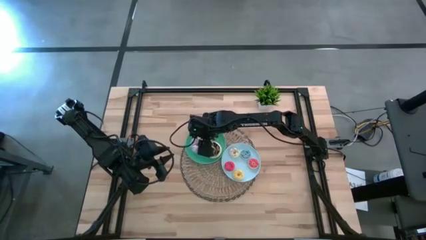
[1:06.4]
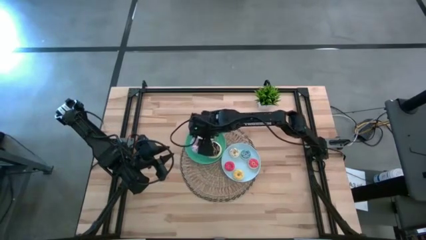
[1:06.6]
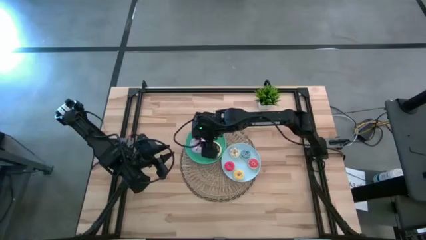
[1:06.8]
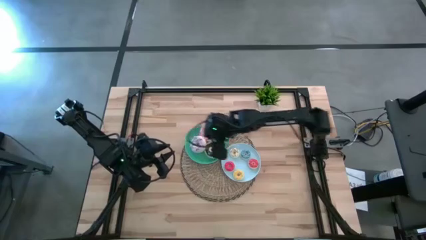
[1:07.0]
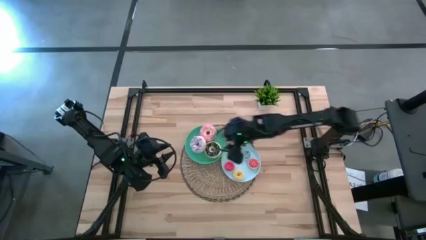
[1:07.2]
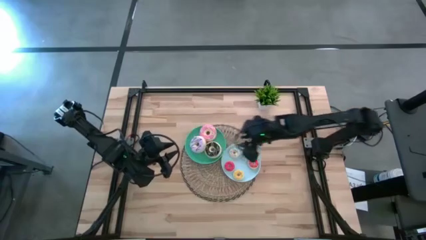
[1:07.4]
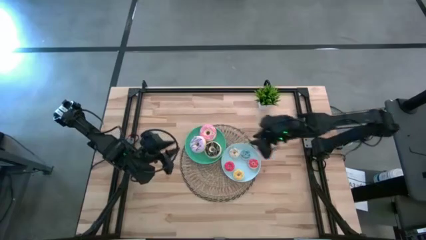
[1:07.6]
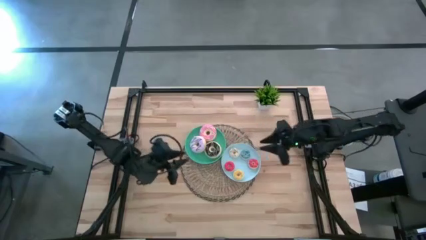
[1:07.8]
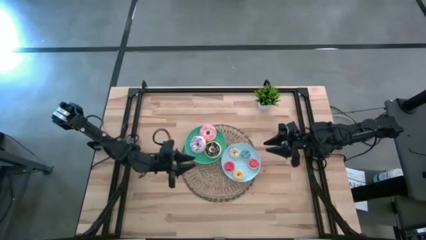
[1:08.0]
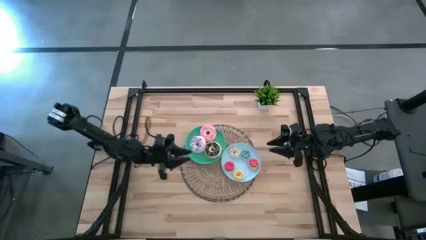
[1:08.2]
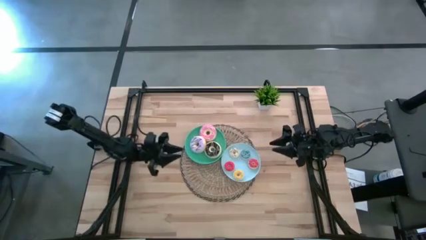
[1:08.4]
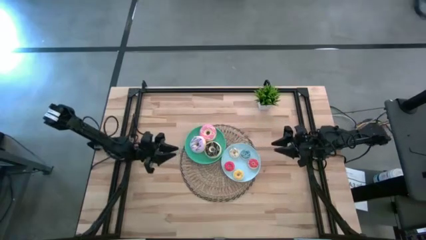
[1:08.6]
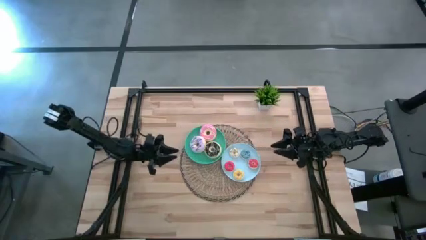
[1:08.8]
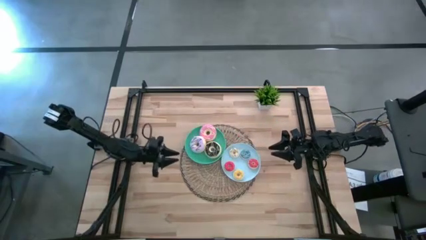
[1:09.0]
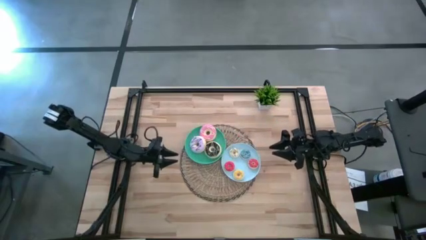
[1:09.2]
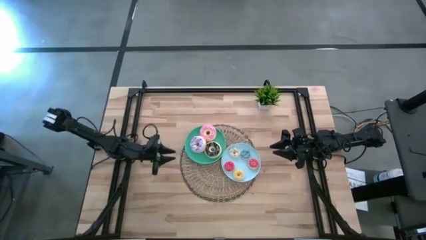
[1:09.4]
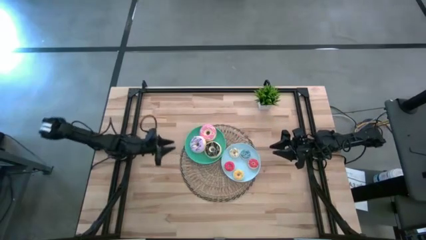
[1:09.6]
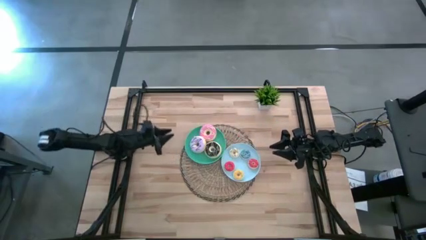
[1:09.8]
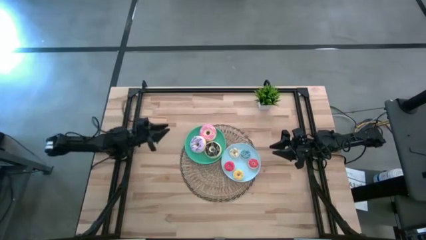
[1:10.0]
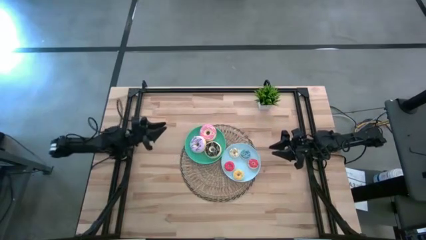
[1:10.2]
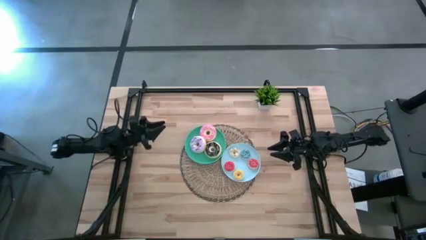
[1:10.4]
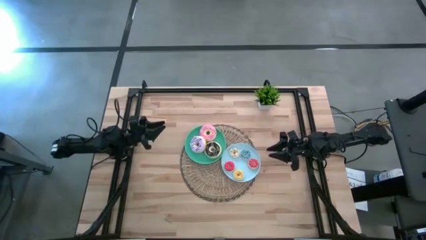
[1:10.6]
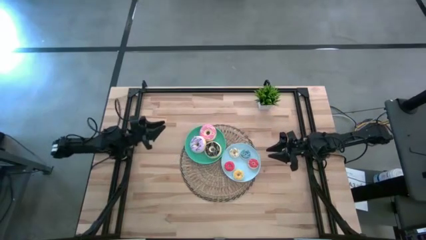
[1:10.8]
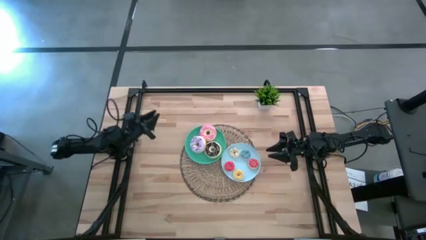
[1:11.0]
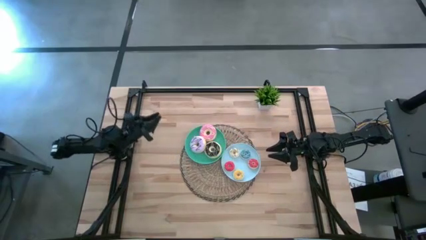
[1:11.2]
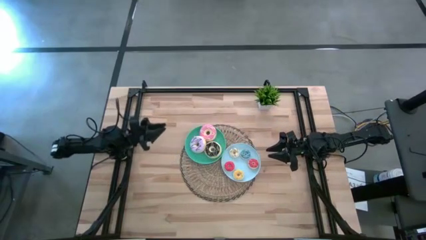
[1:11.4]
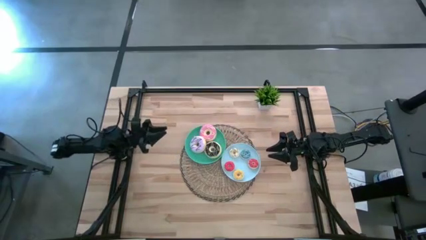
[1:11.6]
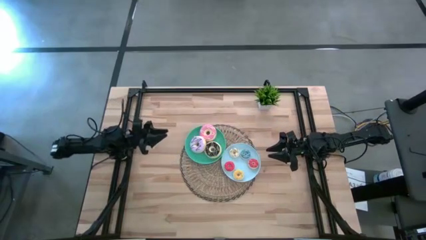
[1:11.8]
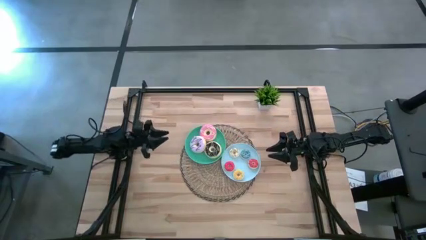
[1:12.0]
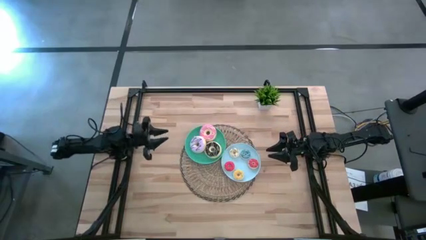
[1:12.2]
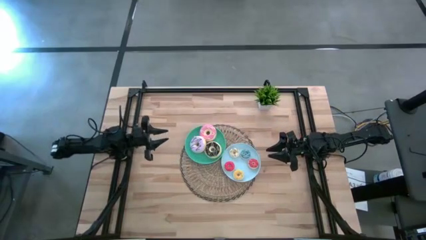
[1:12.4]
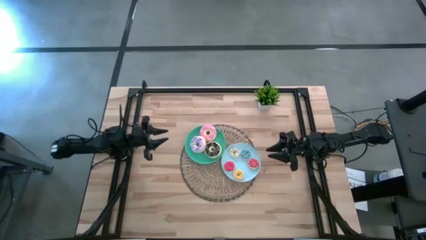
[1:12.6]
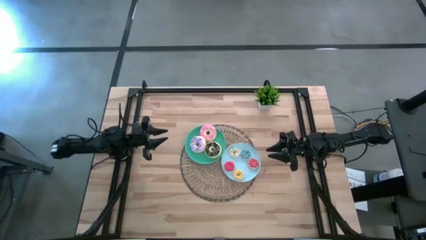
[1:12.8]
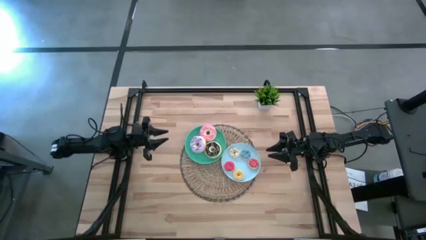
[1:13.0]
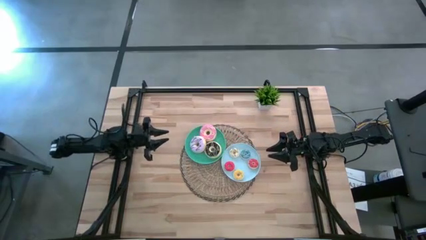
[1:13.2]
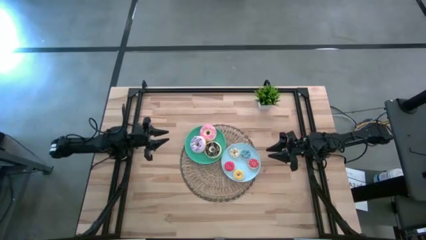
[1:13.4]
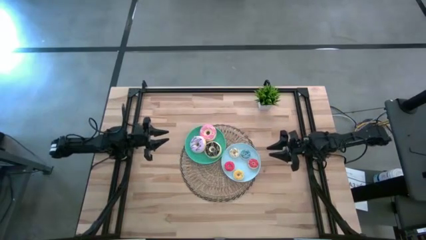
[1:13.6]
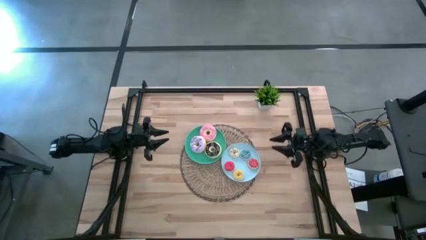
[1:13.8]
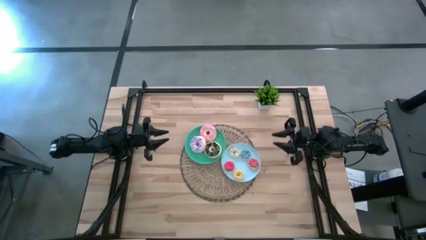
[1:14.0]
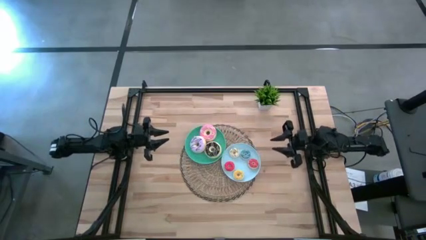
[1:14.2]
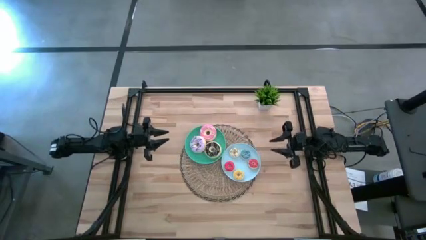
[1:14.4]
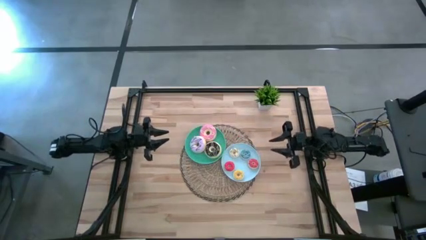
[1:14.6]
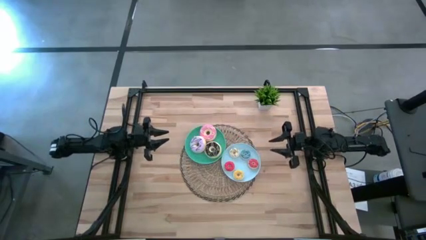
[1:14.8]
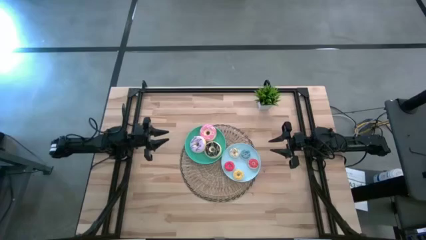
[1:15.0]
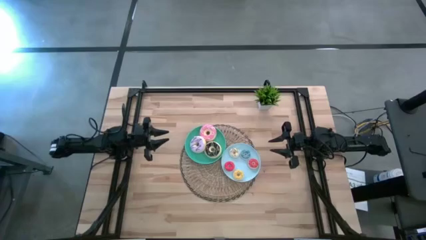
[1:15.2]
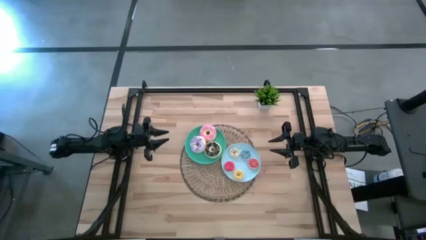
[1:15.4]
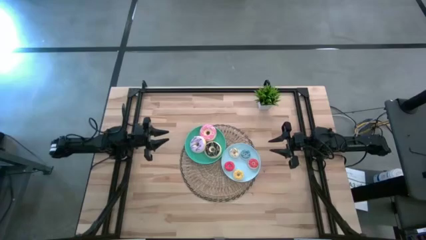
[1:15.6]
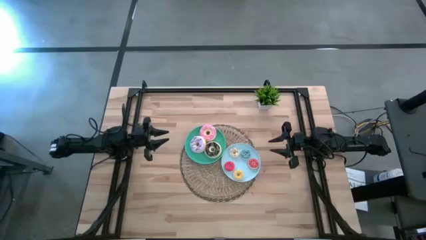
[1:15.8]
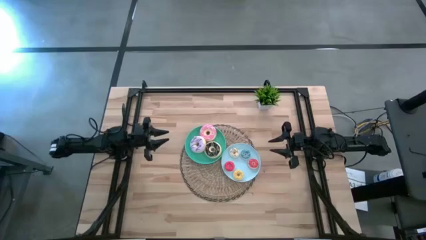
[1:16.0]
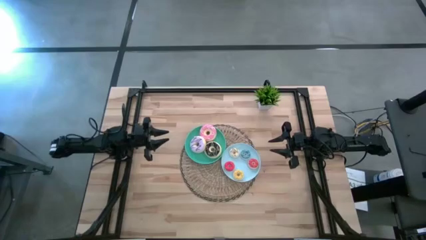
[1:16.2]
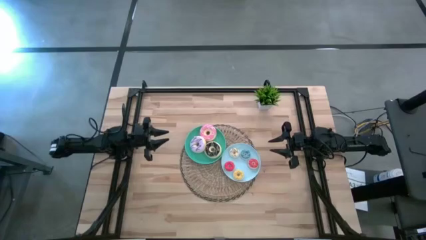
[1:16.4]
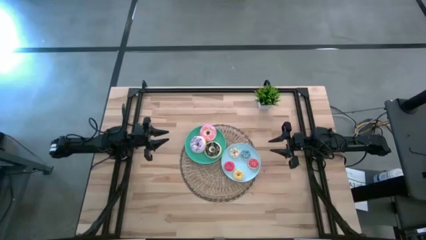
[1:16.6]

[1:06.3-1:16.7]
Task: Pick & Place donuts
Return to Home Position

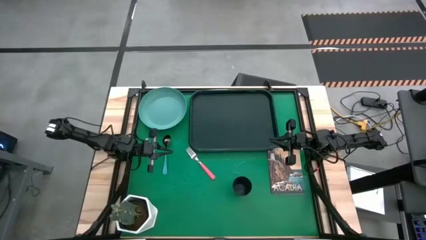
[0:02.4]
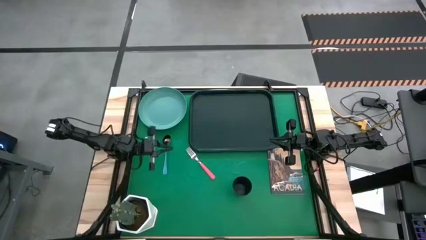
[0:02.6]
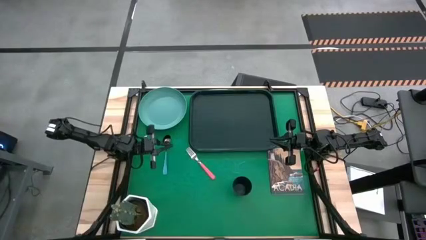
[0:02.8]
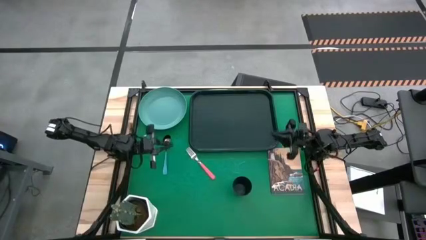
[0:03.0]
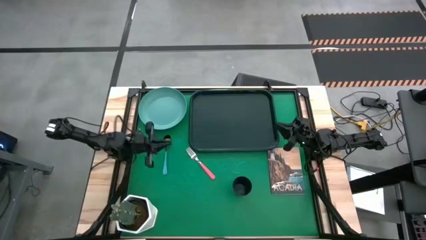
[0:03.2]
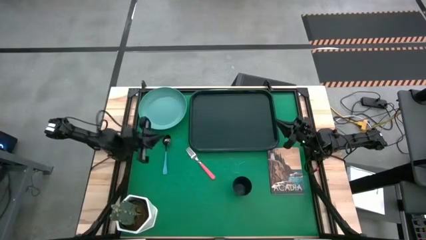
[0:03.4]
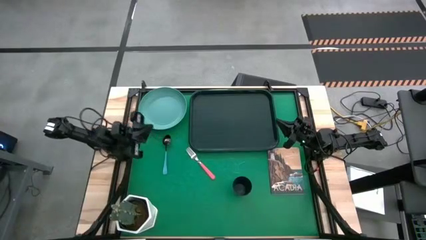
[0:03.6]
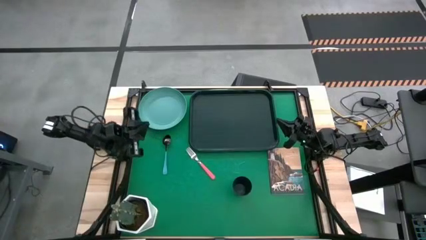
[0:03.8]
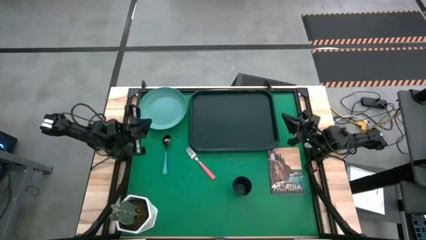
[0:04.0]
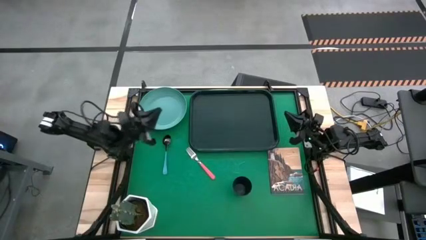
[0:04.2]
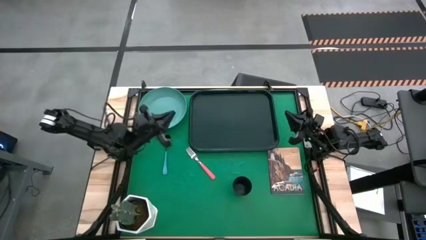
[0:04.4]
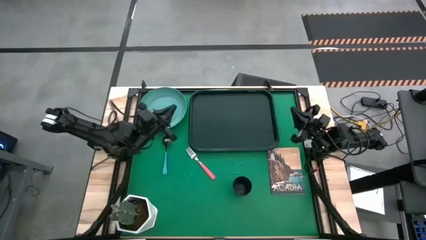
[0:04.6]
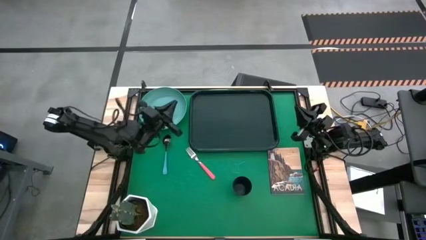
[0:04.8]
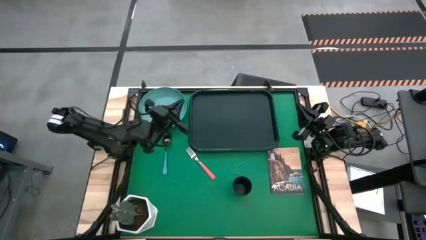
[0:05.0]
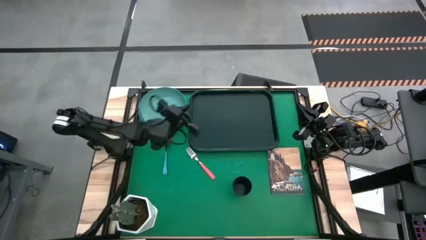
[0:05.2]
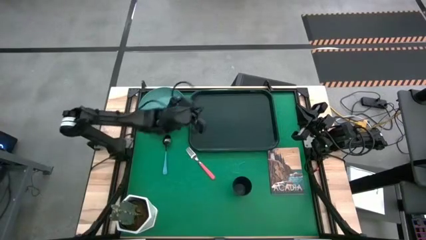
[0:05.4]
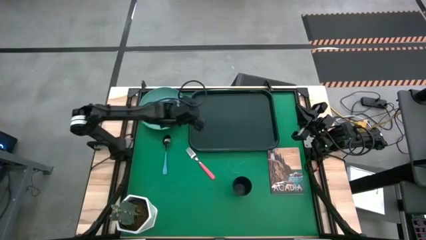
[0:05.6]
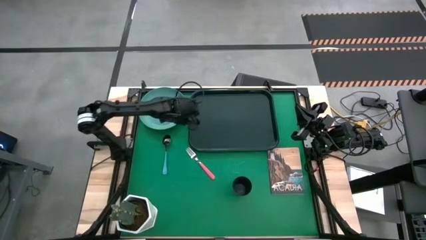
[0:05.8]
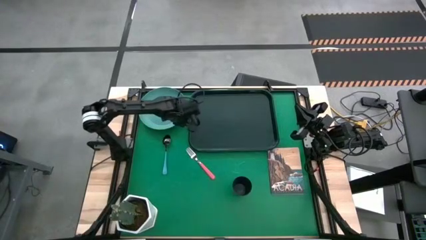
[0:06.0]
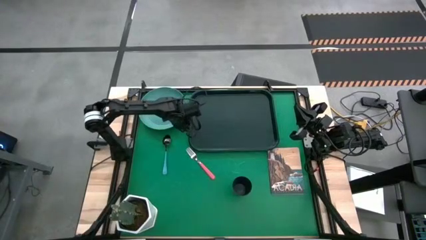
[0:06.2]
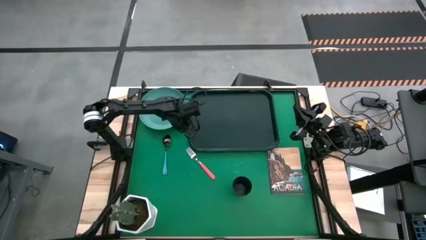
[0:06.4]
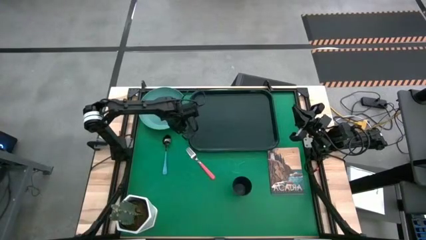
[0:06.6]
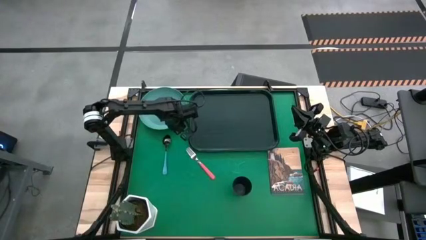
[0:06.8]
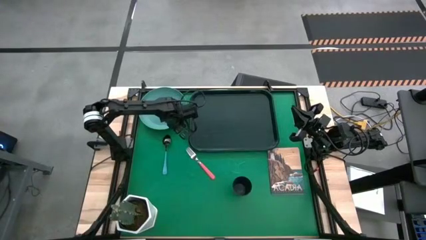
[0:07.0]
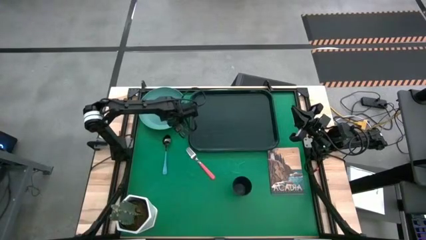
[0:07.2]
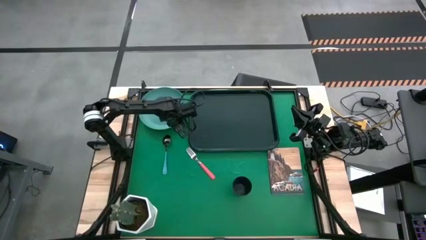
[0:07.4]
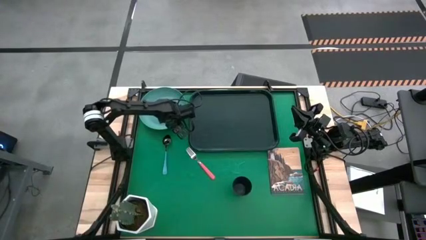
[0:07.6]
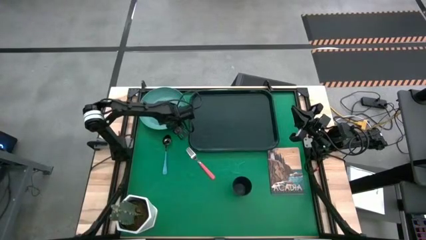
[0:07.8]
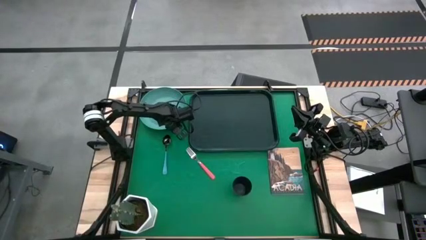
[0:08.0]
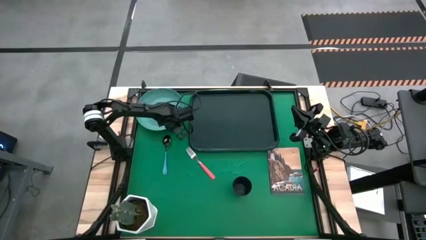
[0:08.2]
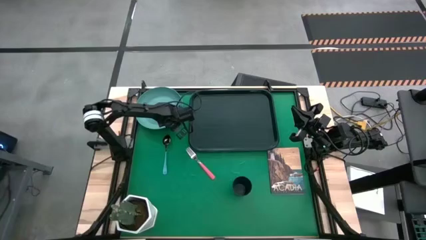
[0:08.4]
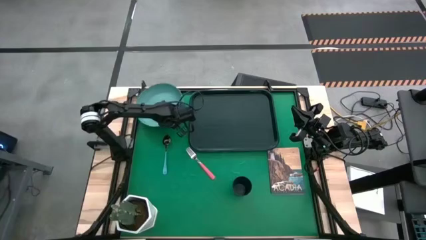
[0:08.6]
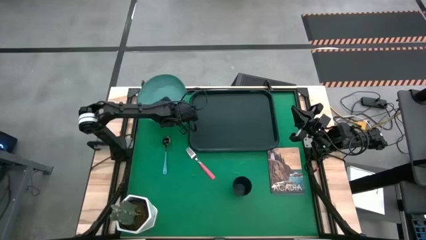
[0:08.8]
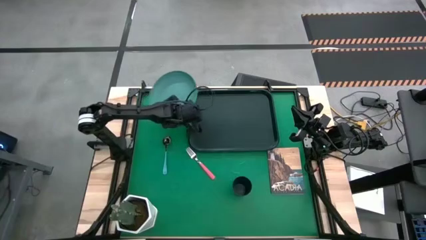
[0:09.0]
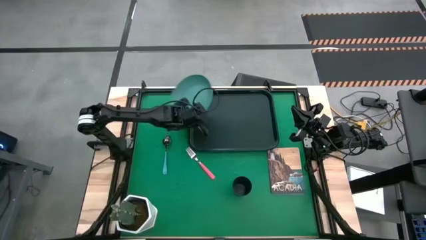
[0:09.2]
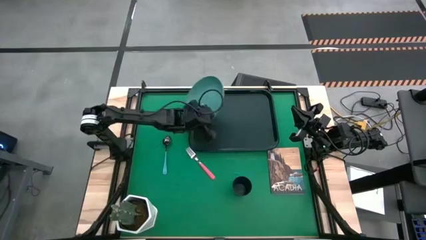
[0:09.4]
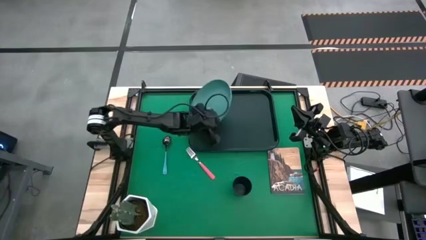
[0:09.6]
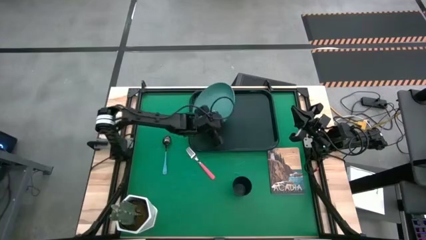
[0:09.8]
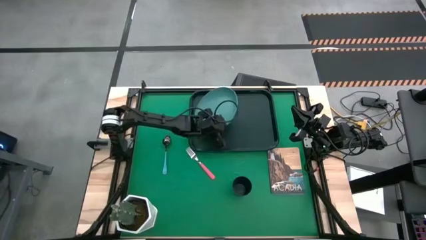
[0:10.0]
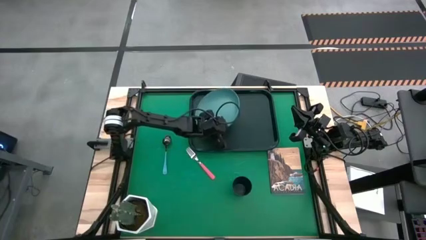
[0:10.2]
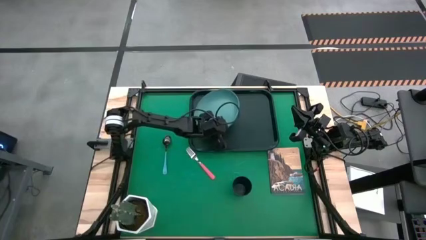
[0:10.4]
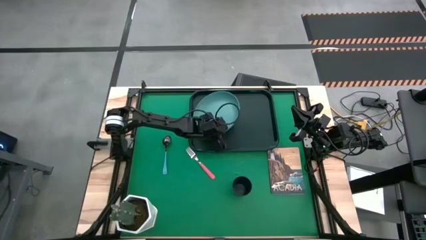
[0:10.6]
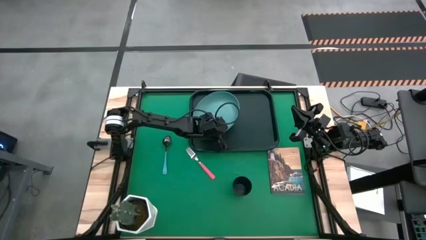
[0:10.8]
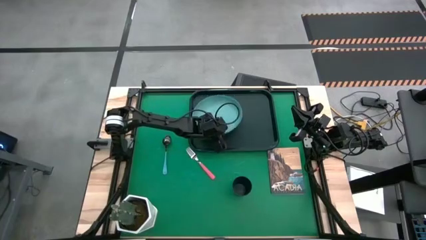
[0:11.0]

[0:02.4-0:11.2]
Task: Pick and place plate/cup/fork/spoon on tray
Put the green plate on the black serving tray
